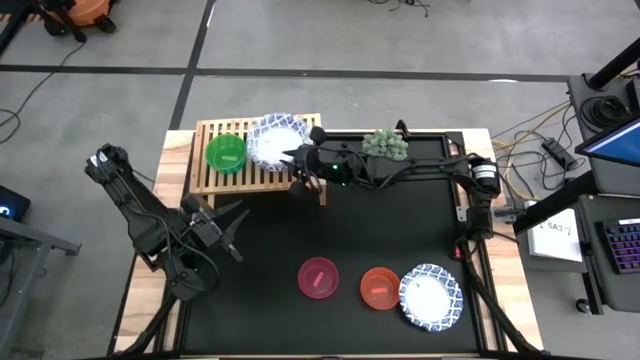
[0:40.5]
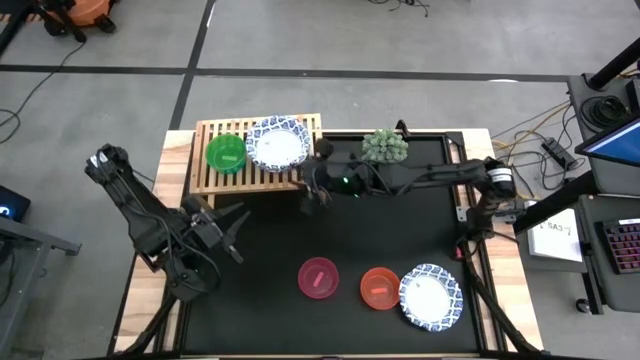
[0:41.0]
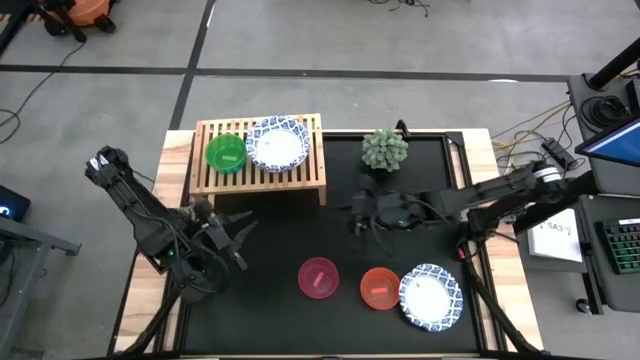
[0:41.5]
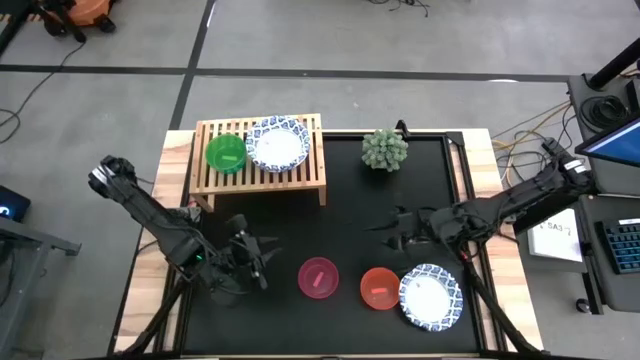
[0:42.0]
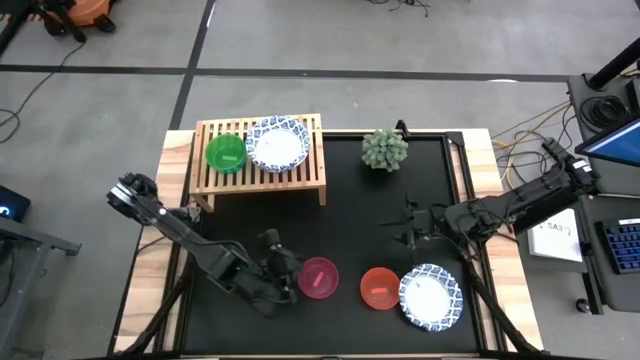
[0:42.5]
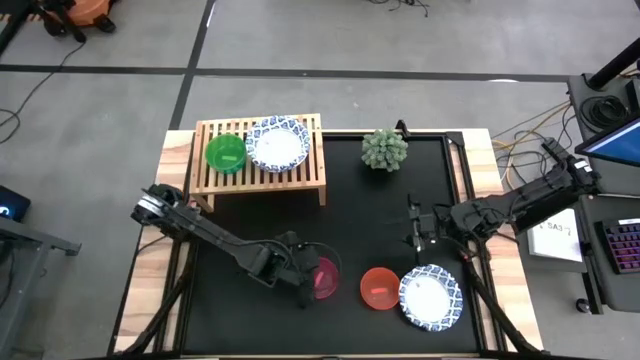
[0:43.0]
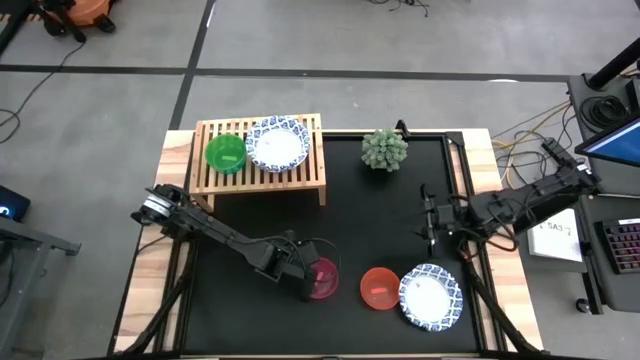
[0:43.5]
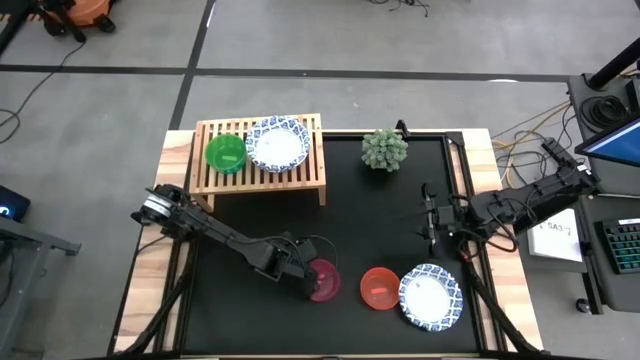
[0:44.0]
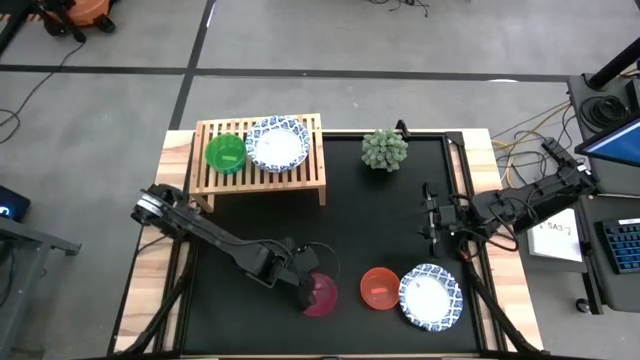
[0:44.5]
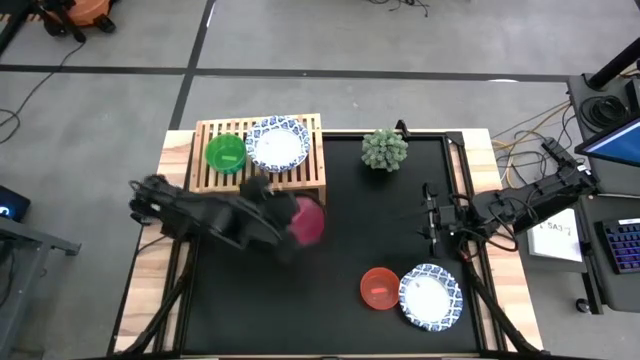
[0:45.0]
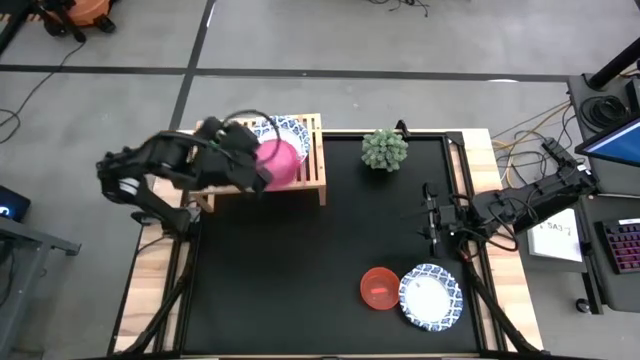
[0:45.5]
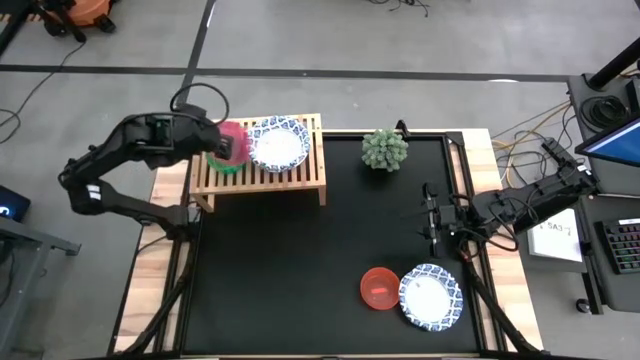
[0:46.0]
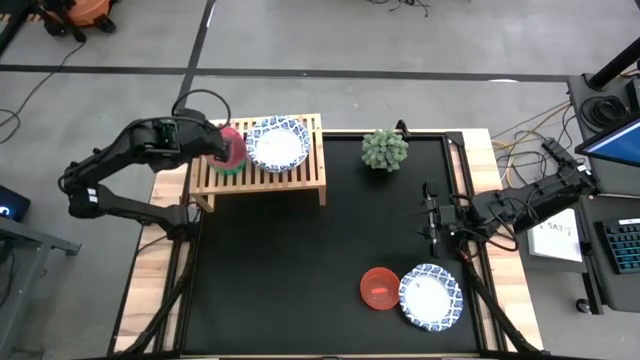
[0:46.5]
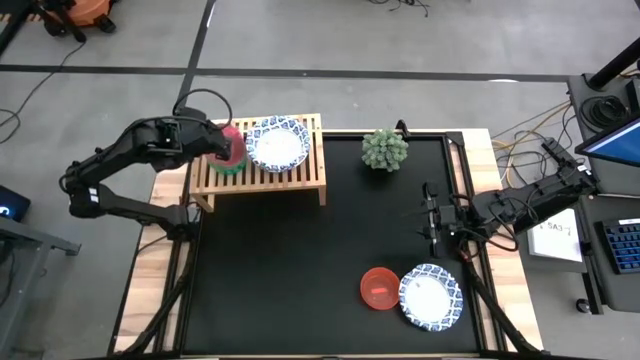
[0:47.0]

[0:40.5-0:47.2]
Task: Place and stack bowls onto a shelf
Stack the red bowl on top of the green bowl

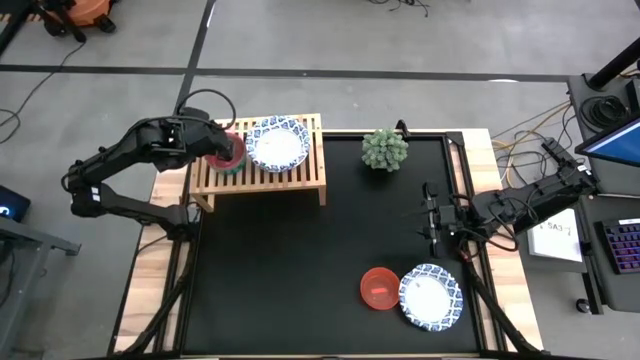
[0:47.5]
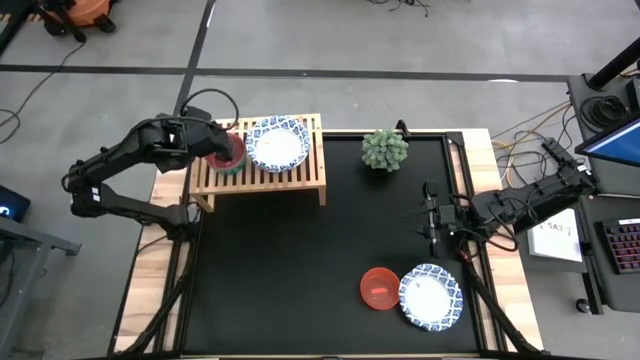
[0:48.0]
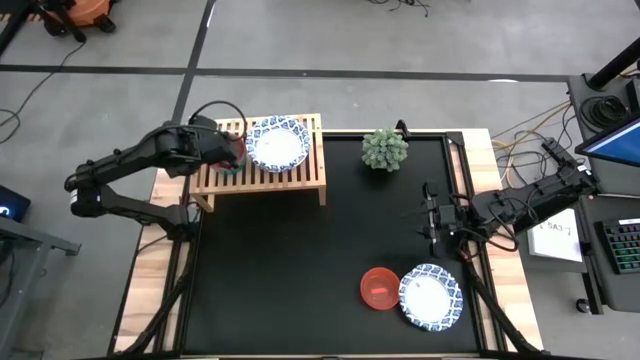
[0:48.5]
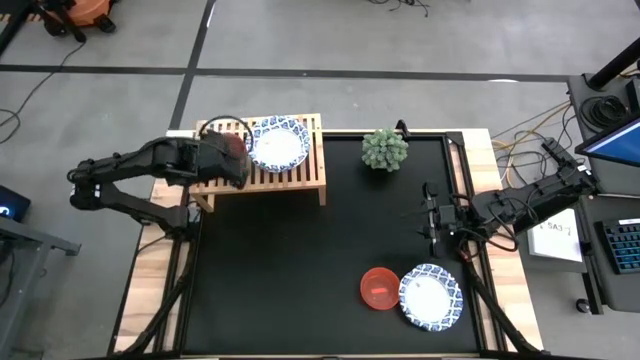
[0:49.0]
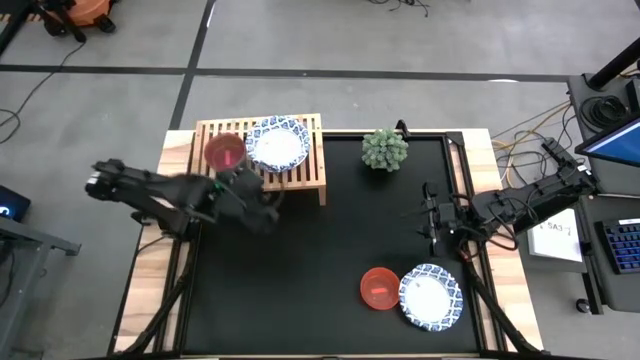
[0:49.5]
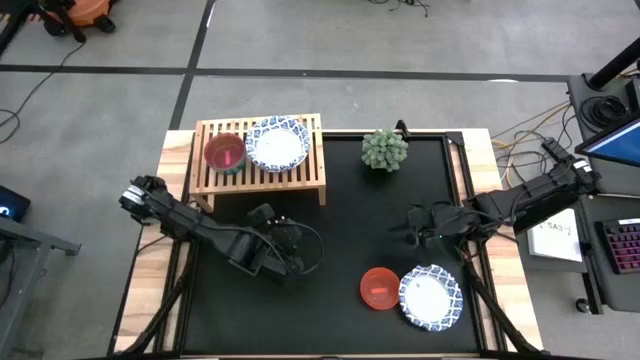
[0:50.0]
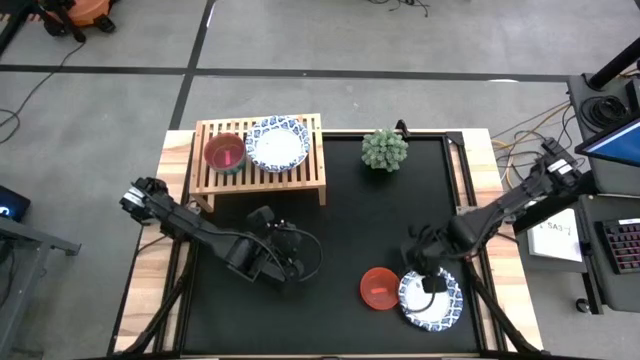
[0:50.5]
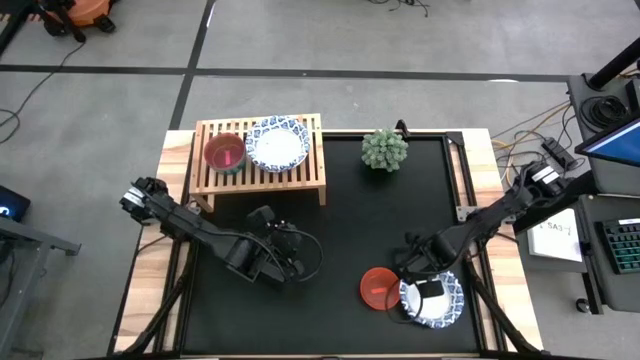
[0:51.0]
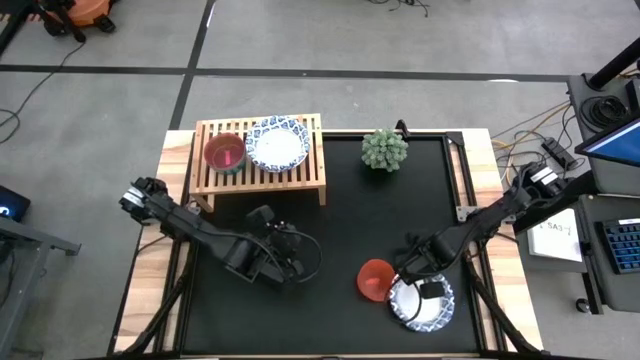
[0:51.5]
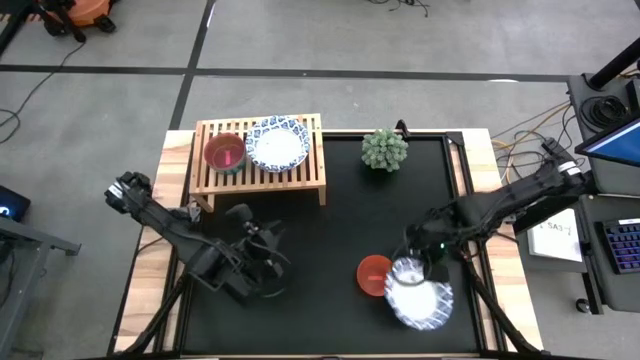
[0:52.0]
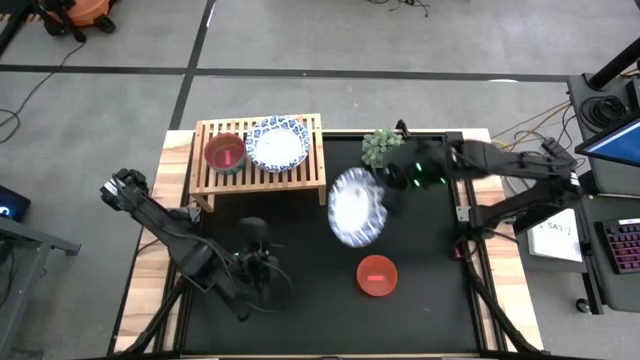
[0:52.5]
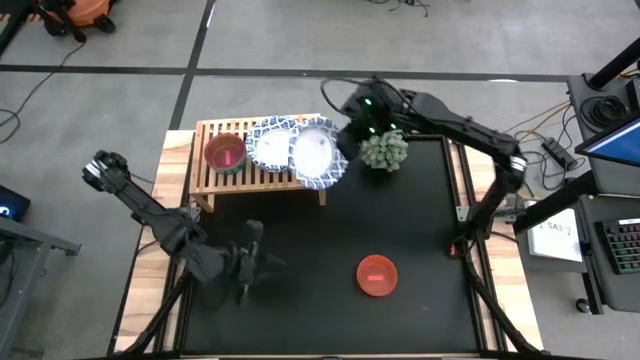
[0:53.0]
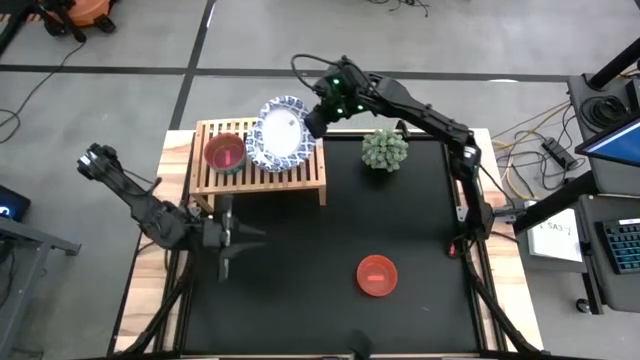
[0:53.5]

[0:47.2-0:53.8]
Stack the white bowl on top of the other white patterned bowl

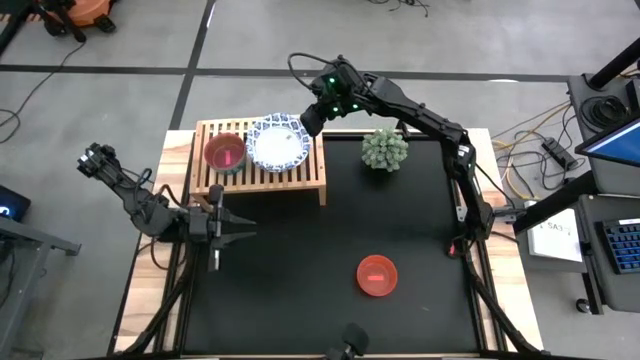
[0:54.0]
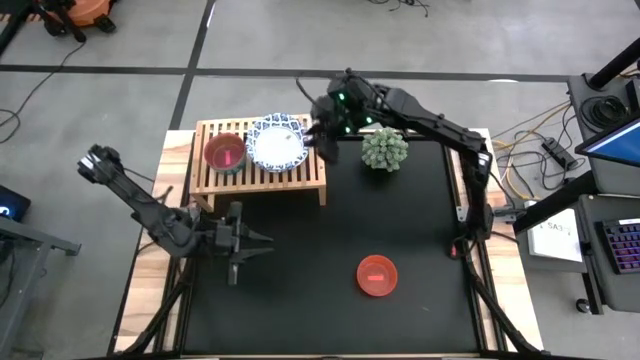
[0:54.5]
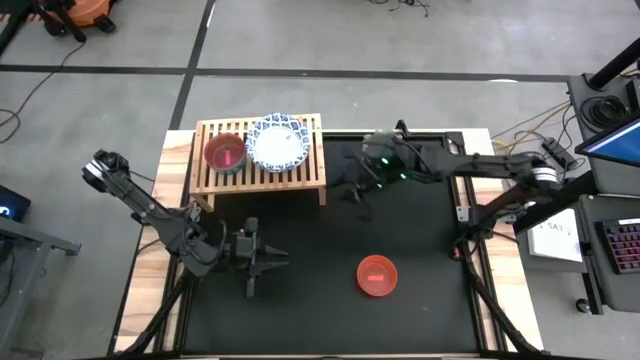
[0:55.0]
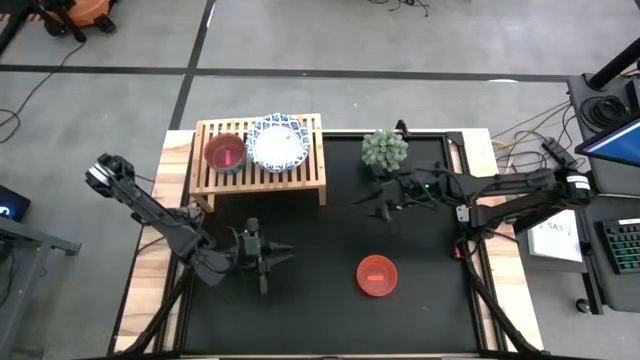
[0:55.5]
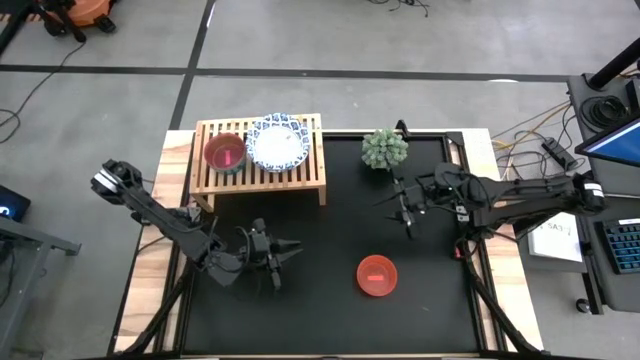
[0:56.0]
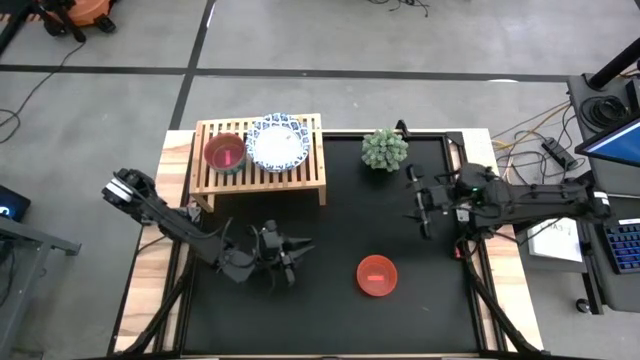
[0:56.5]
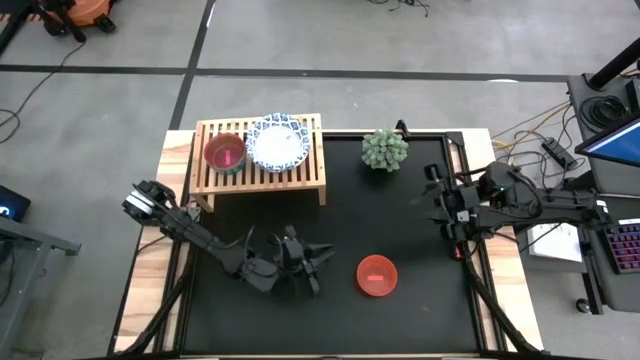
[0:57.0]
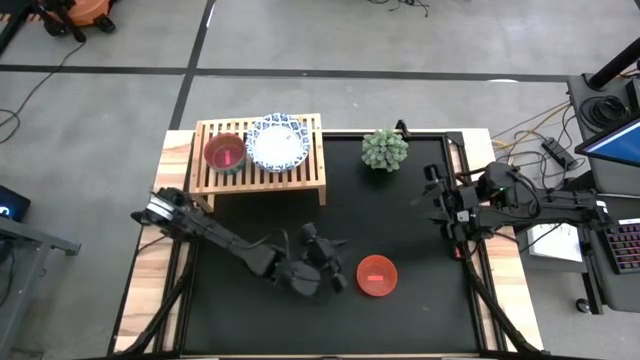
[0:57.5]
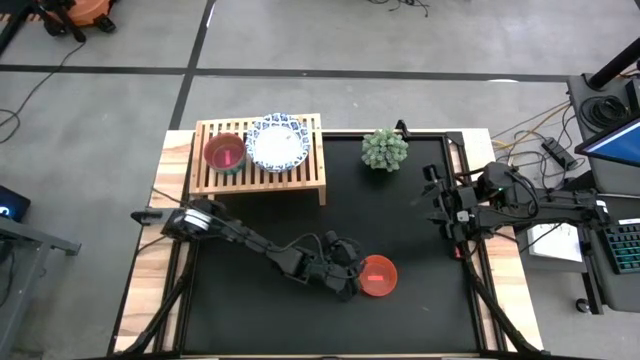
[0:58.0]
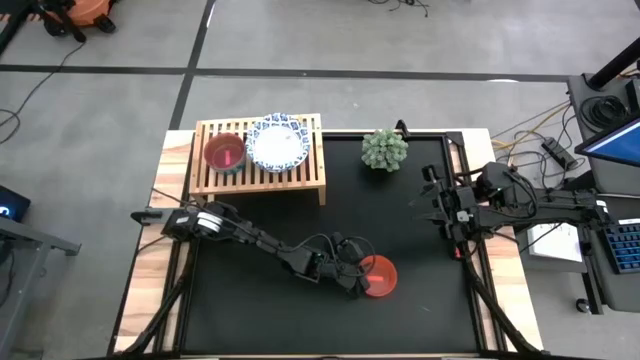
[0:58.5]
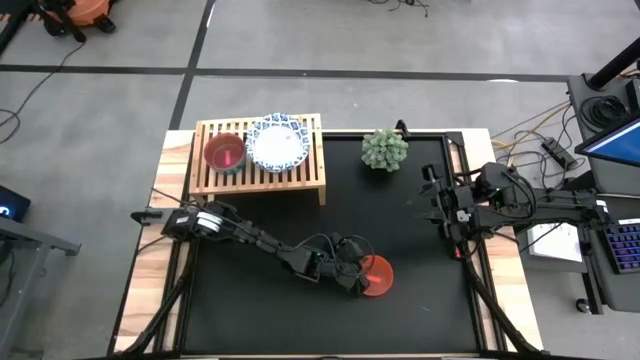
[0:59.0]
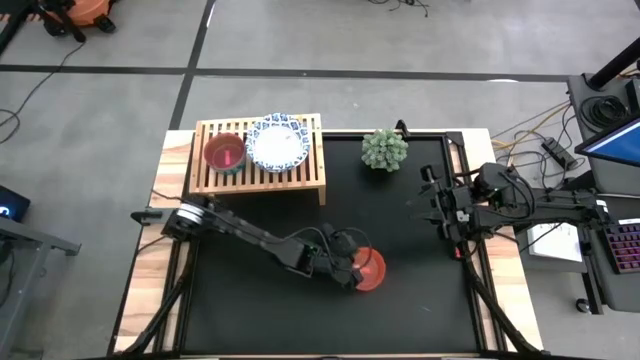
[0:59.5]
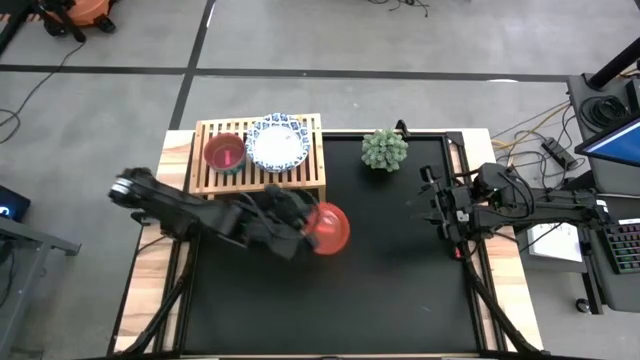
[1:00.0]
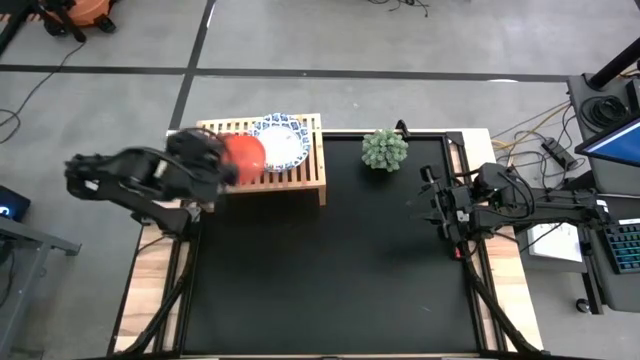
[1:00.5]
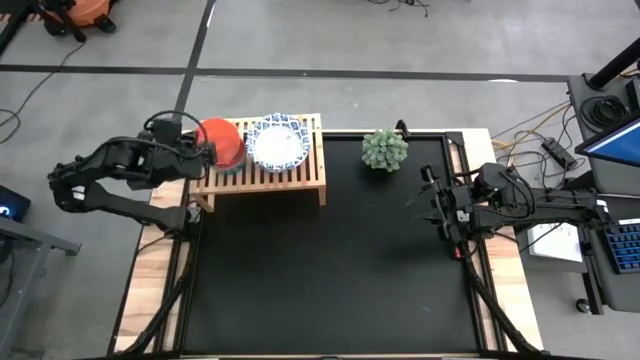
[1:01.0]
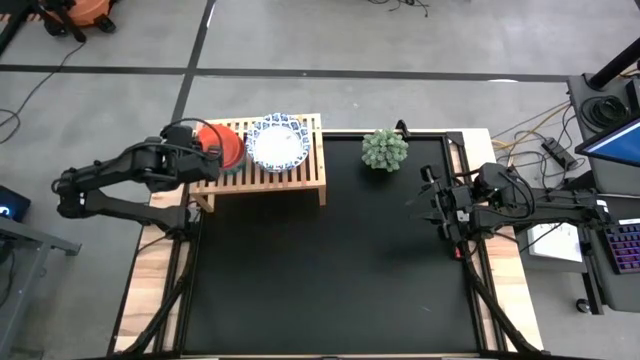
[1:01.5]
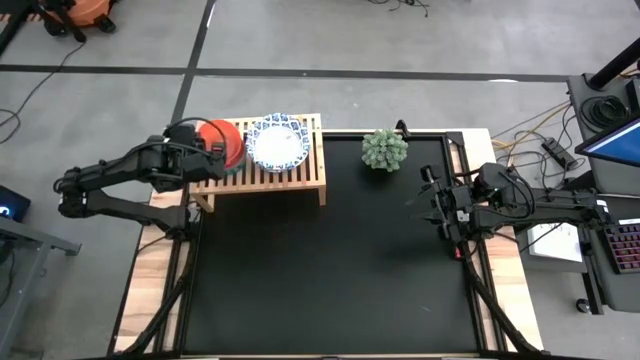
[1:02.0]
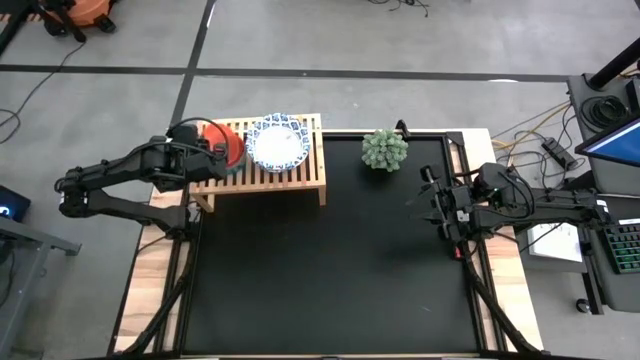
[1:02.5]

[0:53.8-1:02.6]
Stack the orange bowl on top of the red bowl
